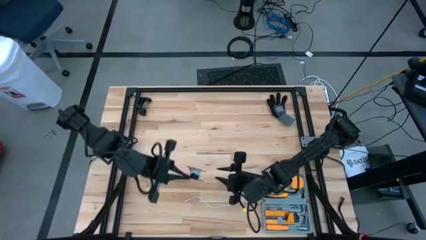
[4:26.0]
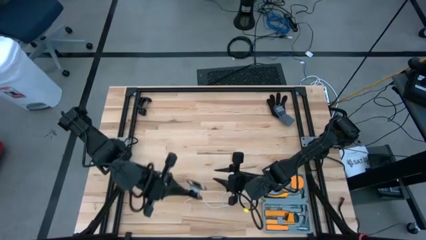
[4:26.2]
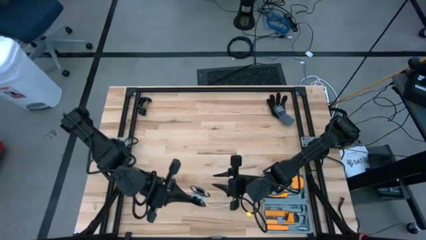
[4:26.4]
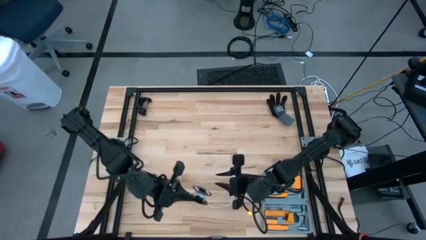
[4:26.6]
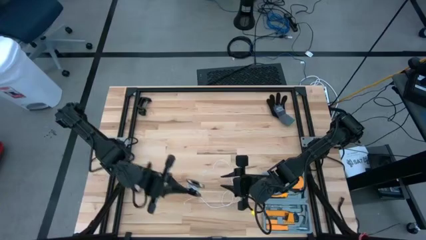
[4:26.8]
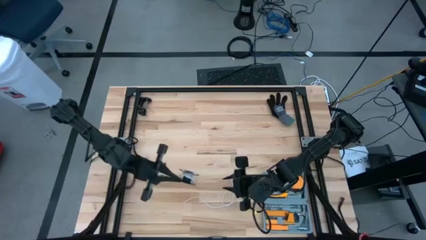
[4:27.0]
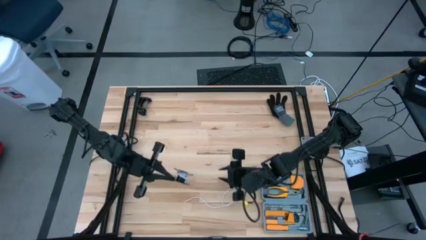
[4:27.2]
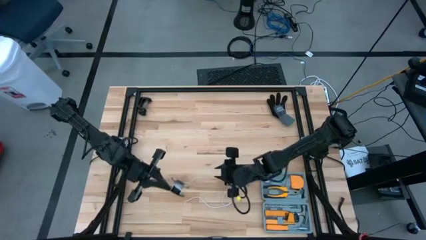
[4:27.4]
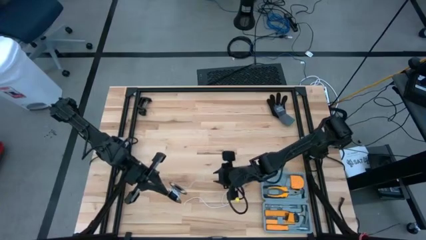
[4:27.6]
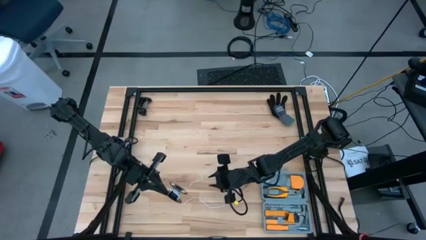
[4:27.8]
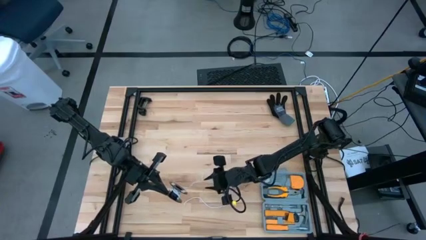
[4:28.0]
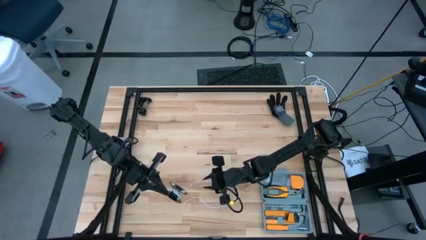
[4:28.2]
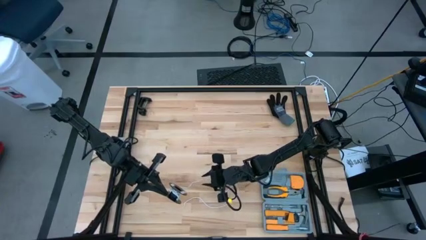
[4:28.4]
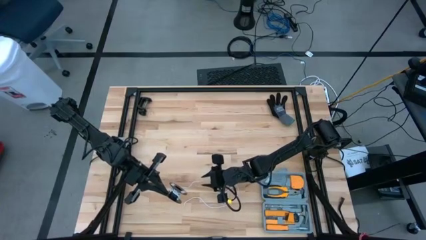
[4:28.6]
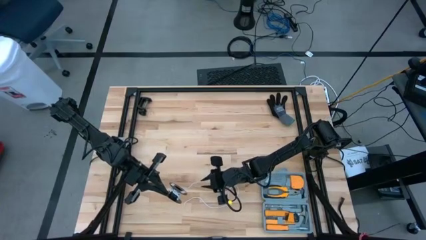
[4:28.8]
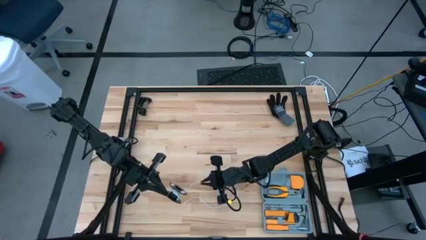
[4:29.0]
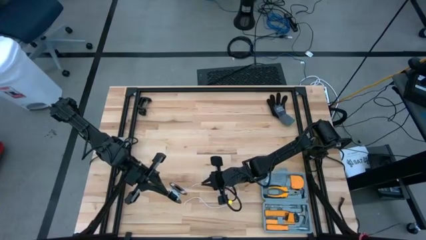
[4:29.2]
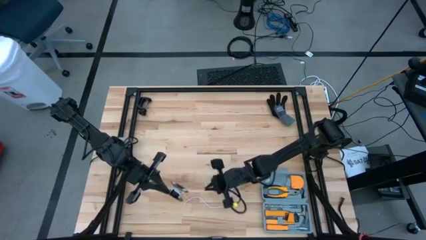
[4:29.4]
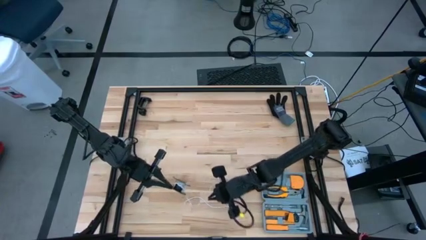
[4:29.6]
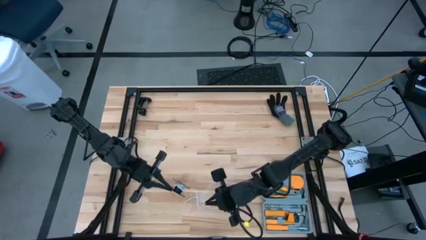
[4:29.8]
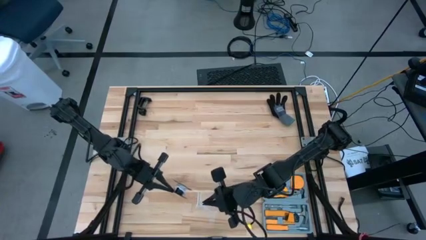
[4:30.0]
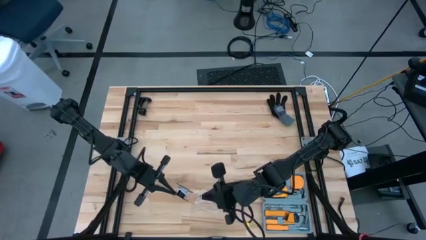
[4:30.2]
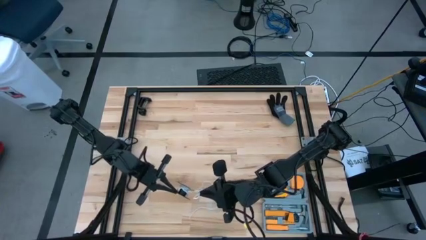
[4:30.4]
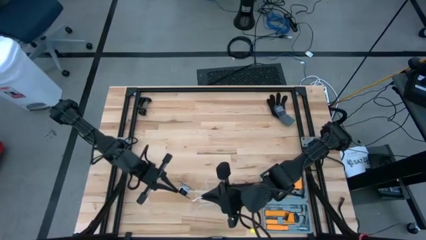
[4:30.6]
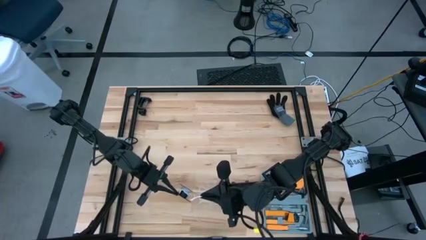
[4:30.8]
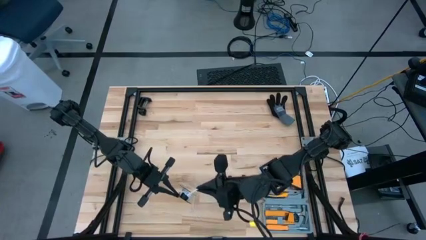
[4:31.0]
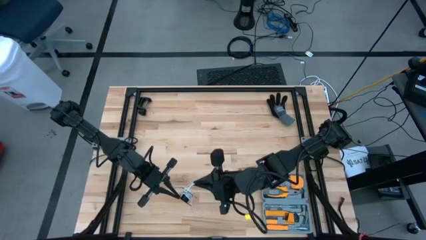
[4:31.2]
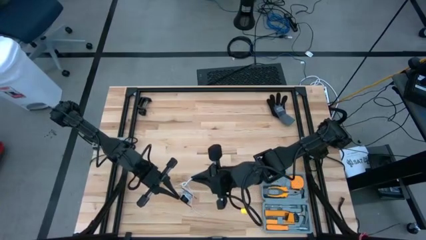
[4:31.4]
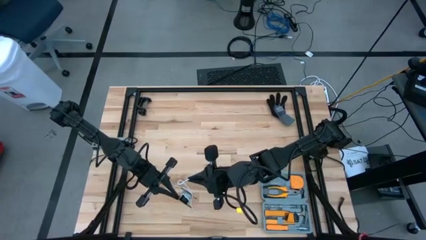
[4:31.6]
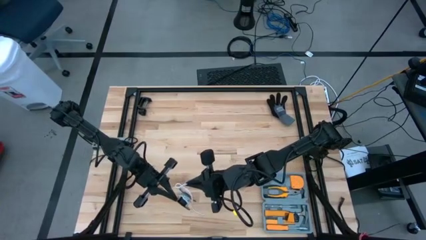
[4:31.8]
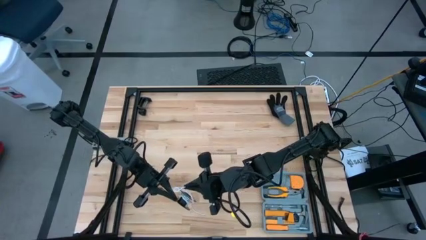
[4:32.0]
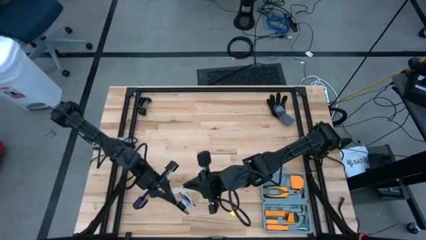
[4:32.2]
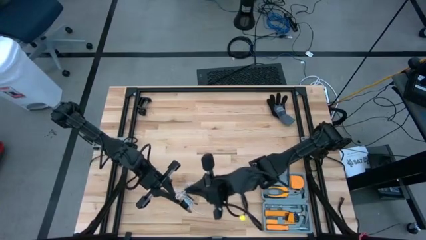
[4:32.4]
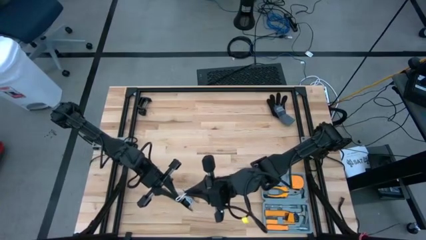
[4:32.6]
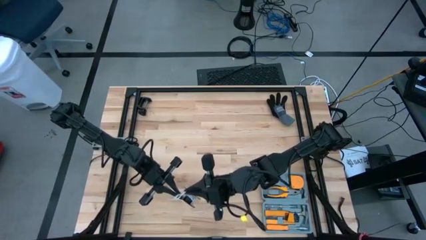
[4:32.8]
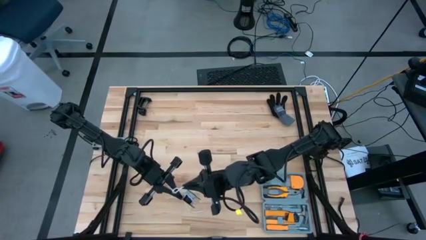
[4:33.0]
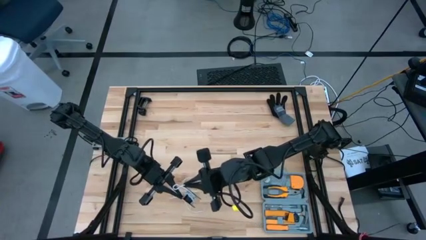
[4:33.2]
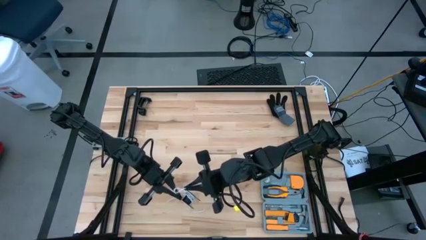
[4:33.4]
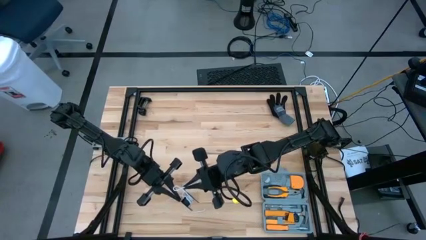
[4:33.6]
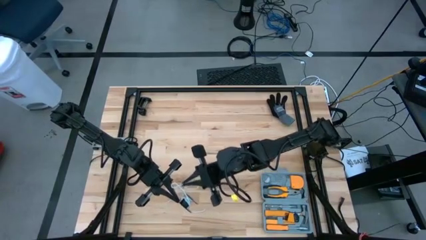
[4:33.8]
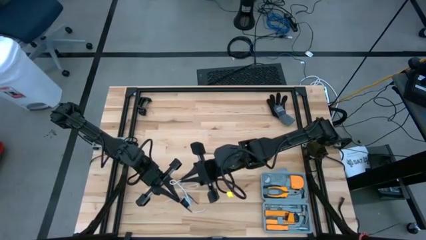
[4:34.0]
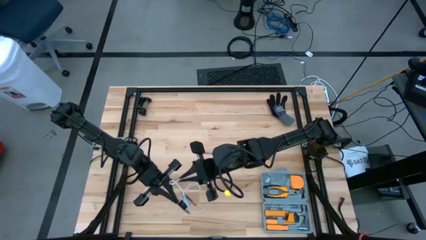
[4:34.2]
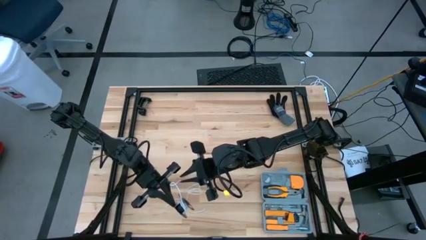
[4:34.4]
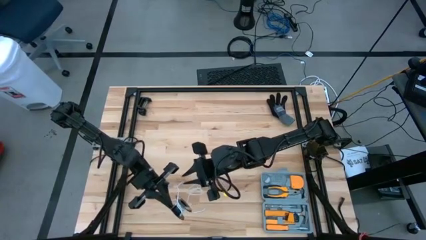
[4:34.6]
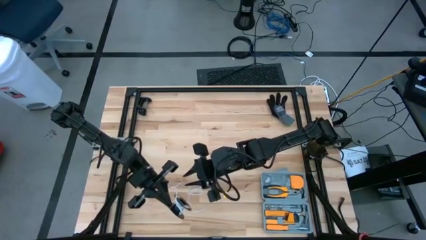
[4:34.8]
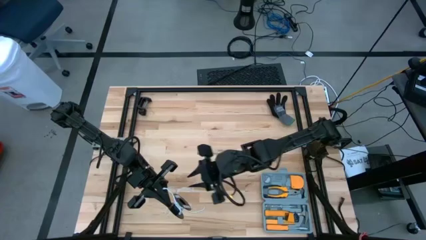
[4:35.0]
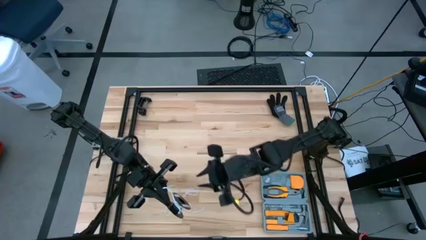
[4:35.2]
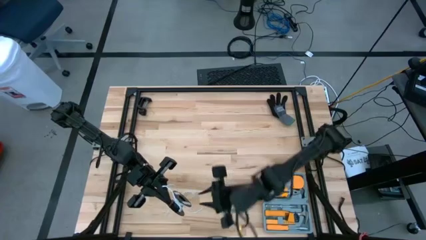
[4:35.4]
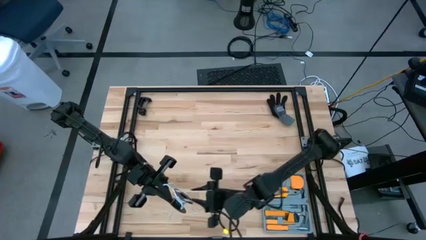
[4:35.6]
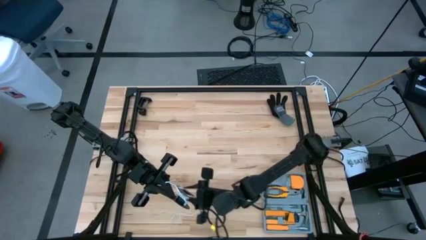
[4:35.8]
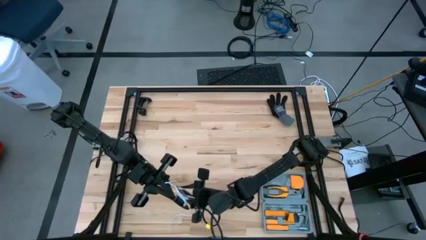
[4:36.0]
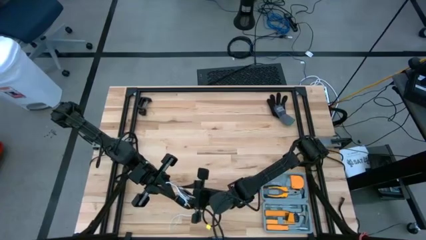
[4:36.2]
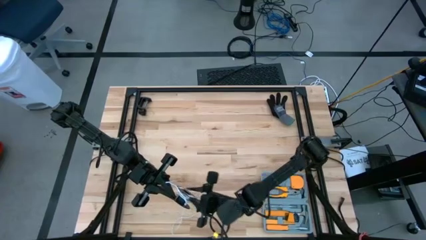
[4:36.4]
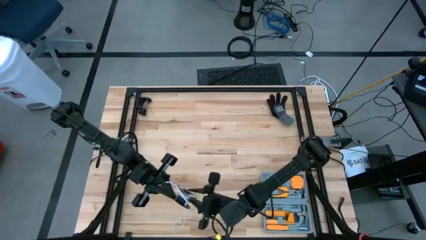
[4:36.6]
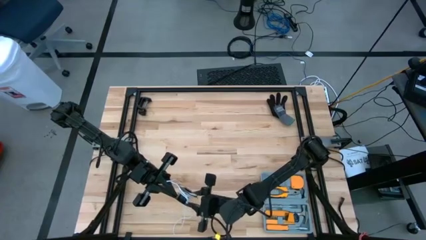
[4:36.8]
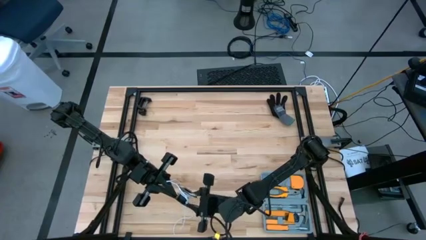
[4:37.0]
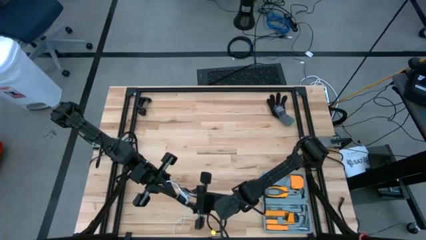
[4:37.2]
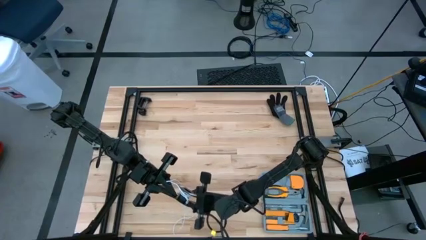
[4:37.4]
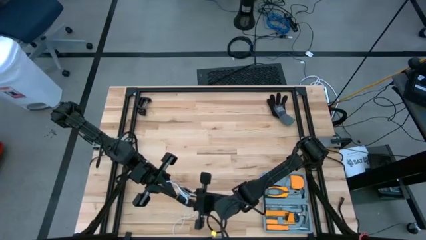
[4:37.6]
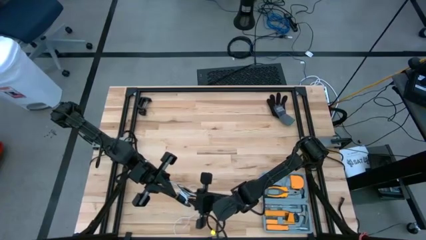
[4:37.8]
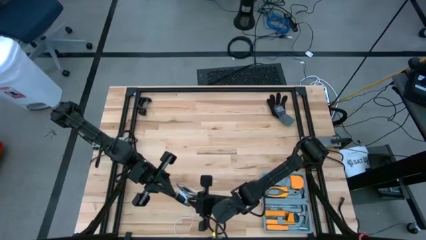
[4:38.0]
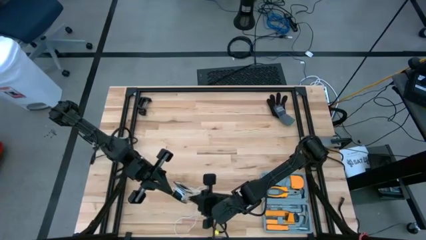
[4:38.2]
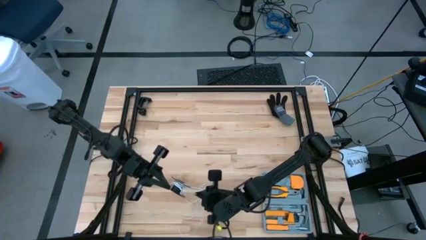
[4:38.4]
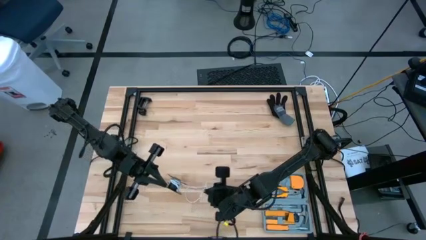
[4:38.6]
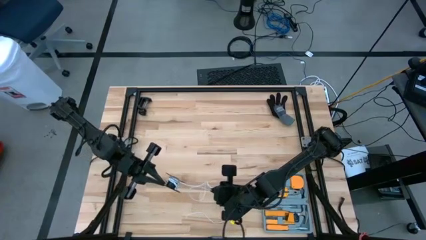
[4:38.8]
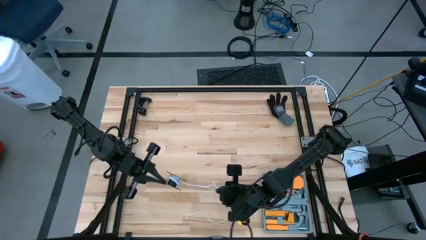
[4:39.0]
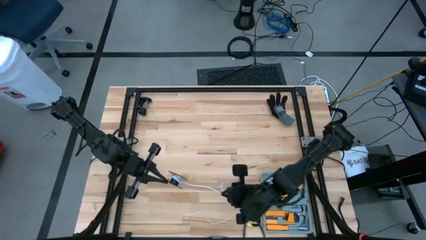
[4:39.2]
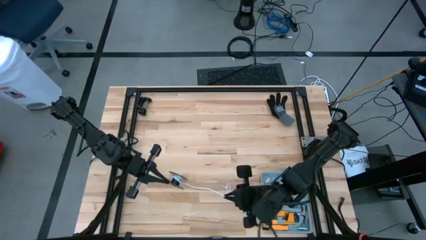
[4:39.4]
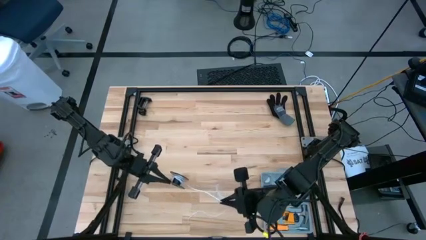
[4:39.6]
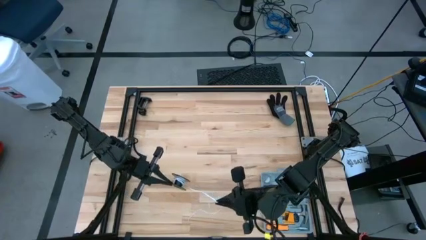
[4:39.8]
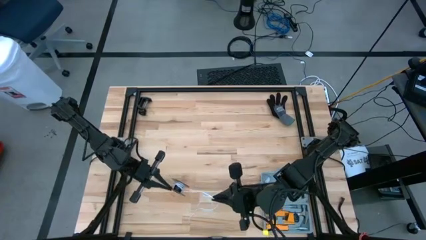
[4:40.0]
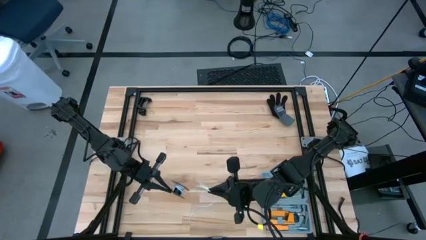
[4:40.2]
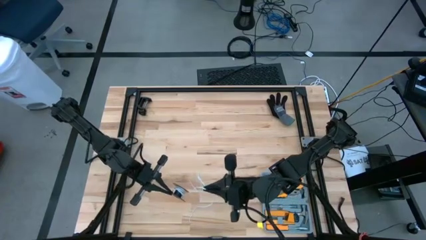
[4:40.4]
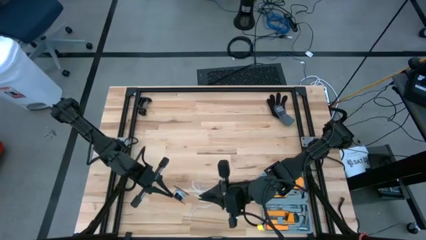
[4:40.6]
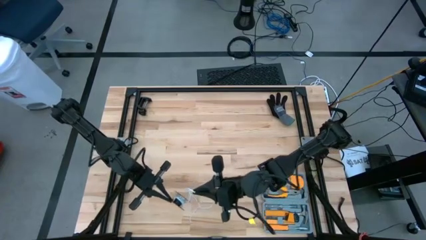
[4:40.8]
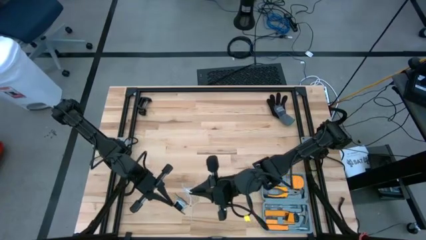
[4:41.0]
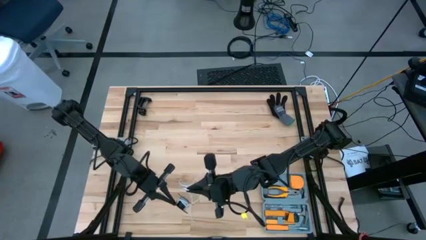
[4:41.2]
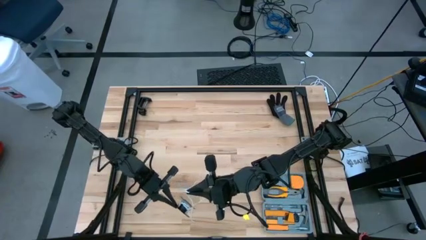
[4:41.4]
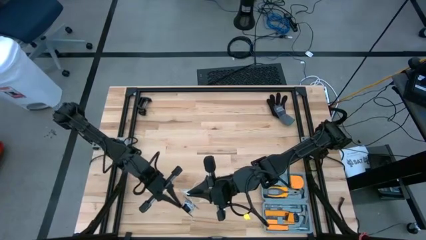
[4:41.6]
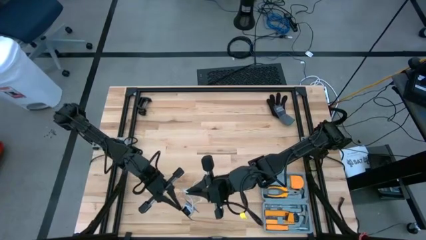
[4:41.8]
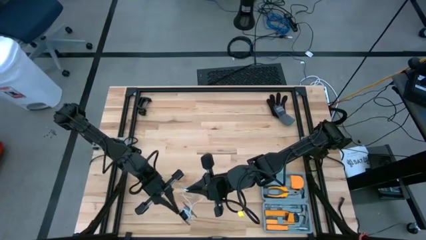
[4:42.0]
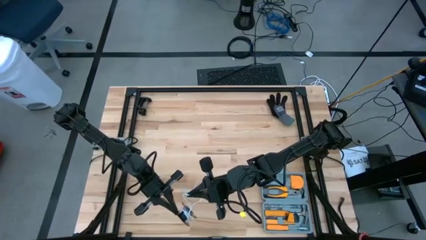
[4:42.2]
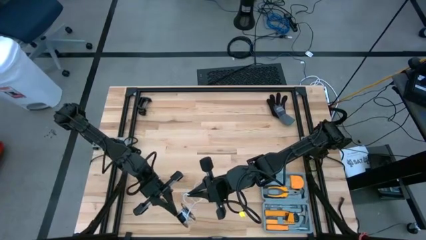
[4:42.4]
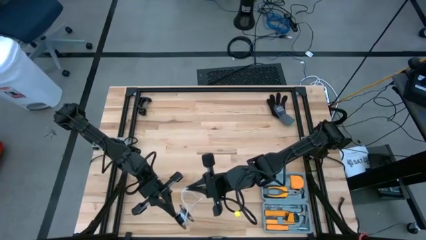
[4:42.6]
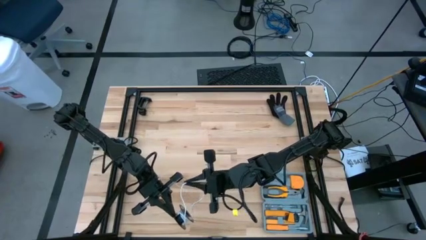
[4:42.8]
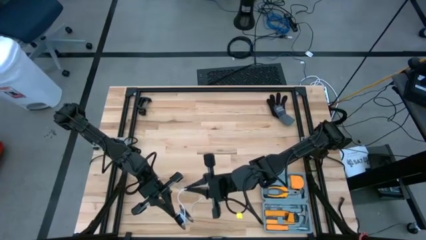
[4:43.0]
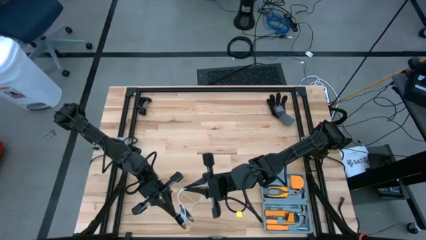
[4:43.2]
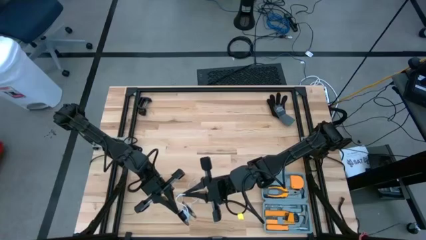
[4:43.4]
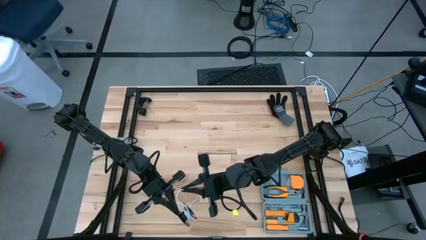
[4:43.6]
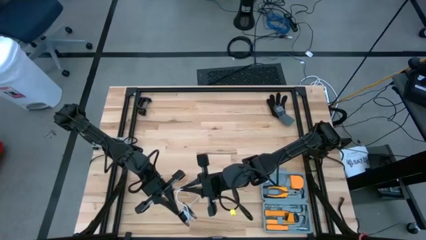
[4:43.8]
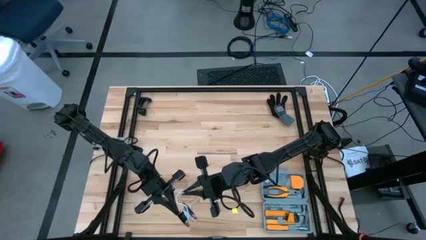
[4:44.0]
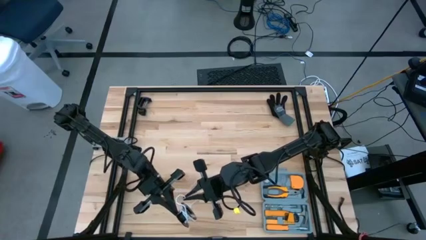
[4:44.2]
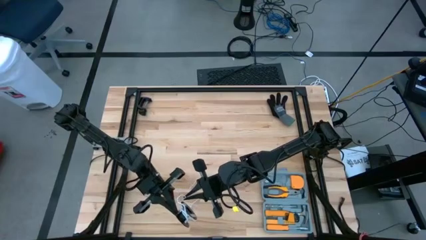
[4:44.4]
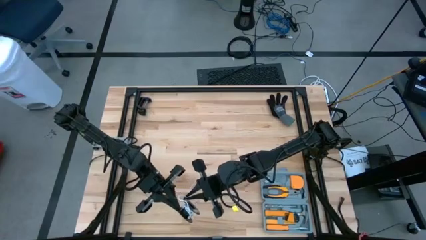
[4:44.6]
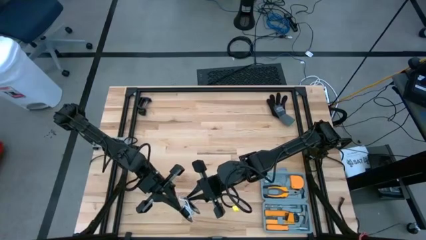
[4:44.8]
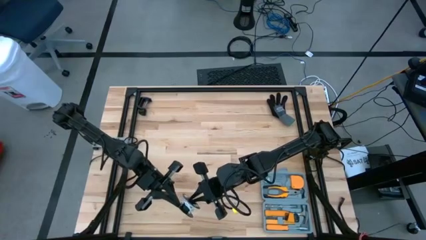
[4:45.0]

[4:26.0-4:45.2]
Task: Coil cords
Coil the white cable wire onto the spool
